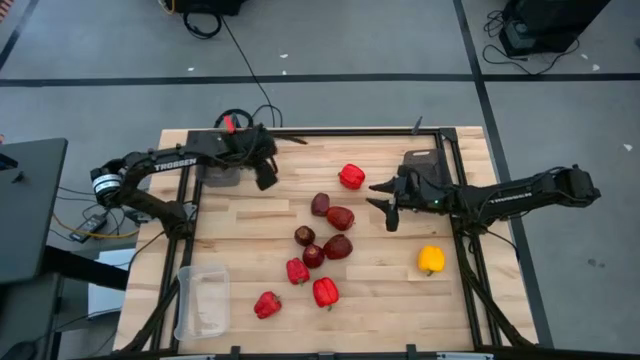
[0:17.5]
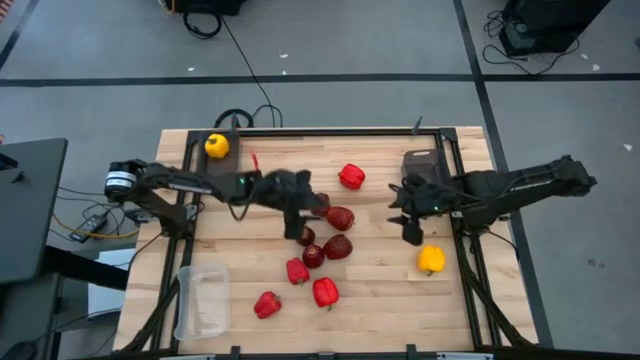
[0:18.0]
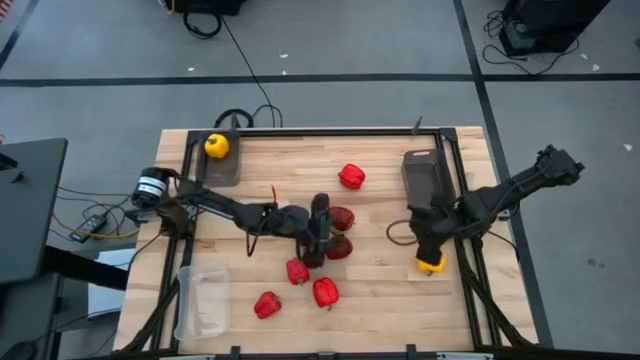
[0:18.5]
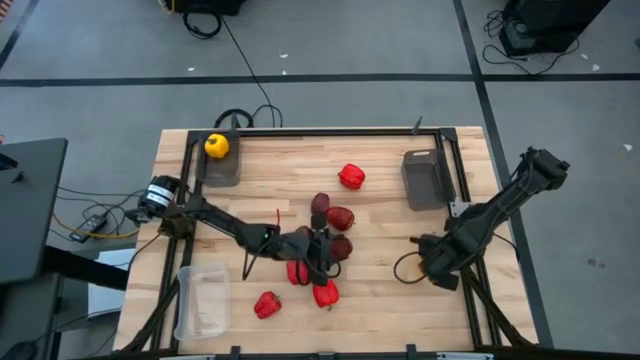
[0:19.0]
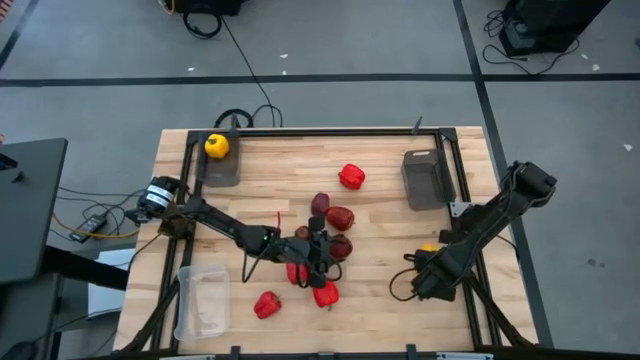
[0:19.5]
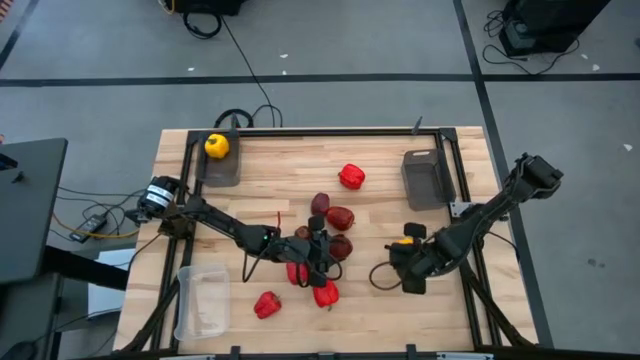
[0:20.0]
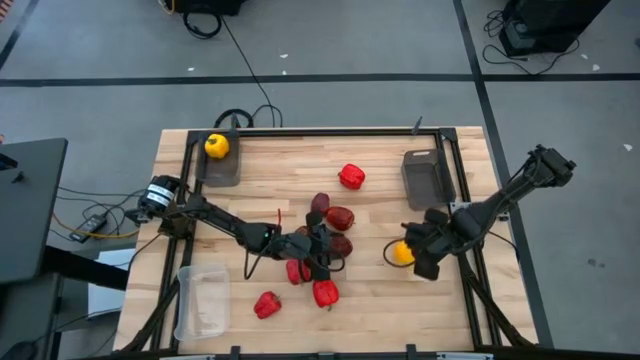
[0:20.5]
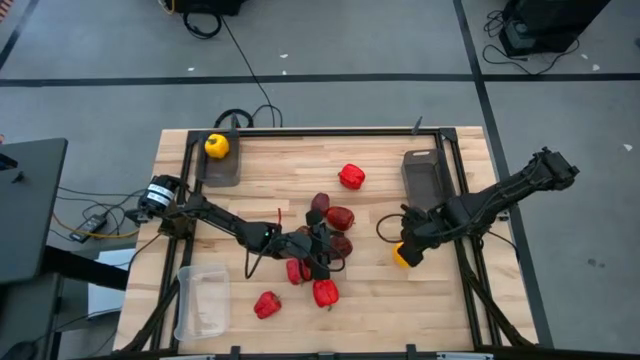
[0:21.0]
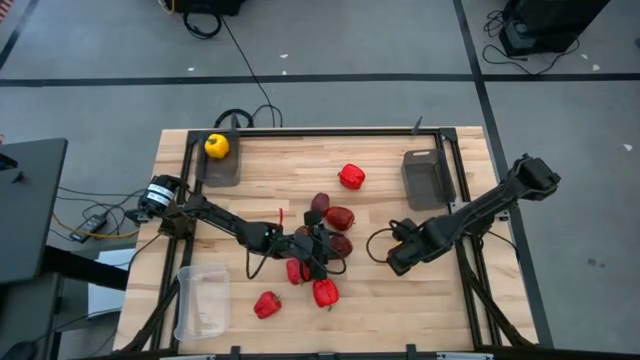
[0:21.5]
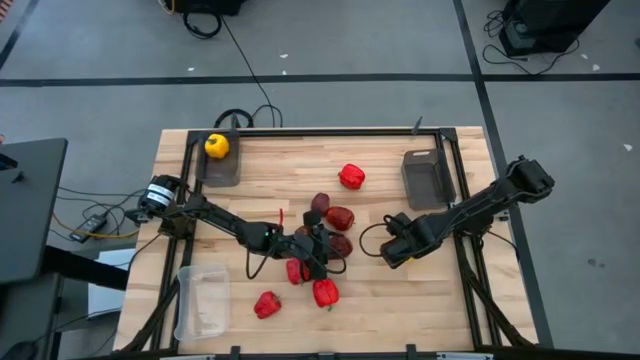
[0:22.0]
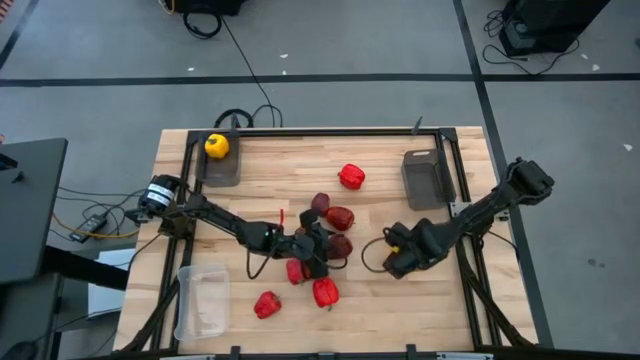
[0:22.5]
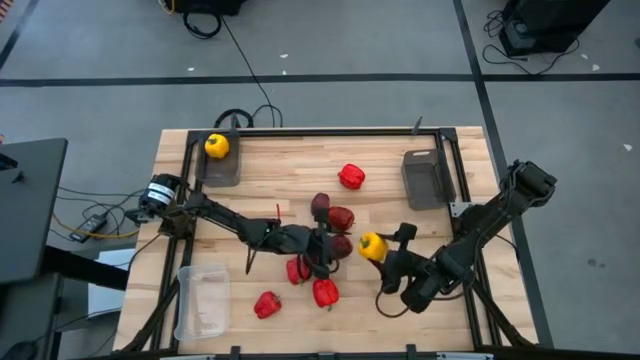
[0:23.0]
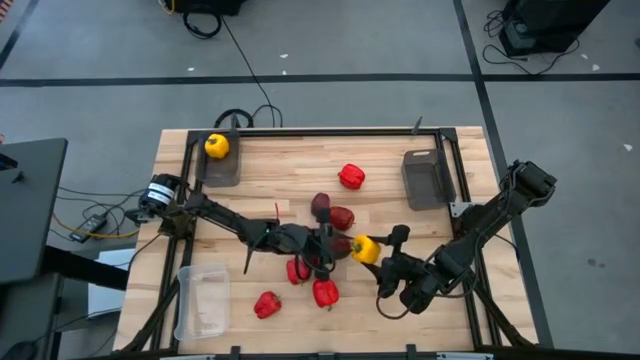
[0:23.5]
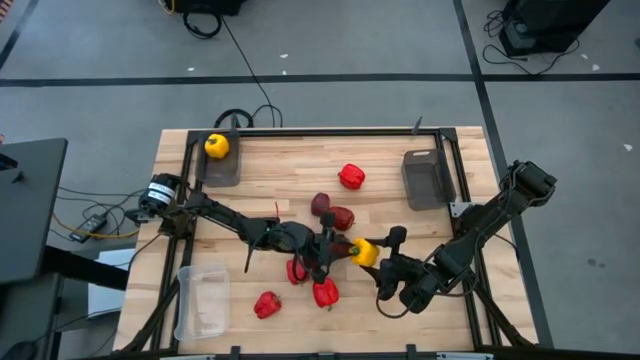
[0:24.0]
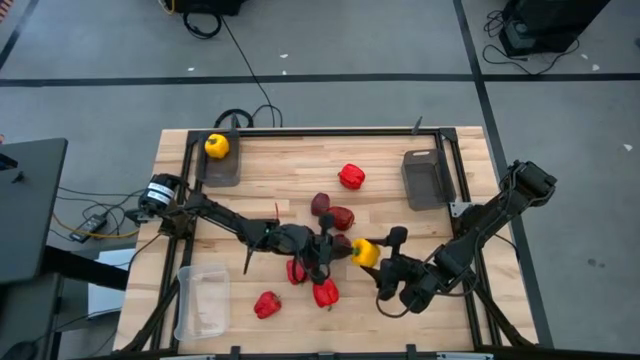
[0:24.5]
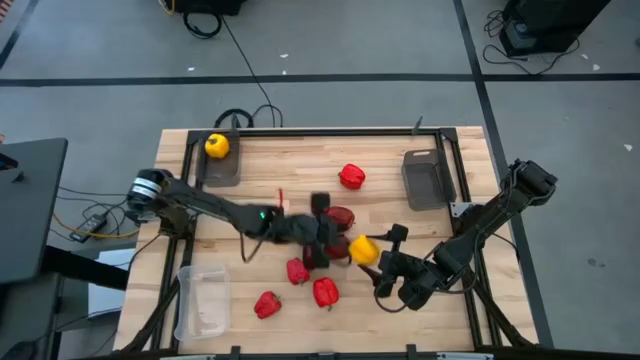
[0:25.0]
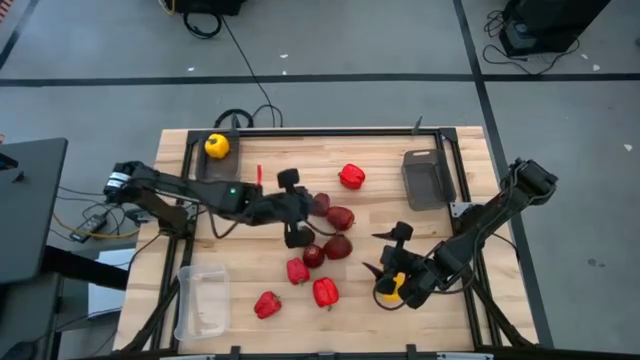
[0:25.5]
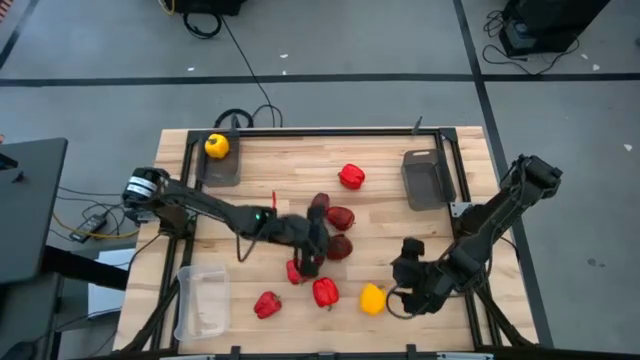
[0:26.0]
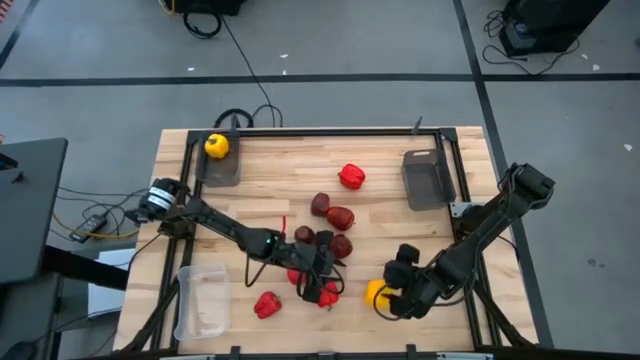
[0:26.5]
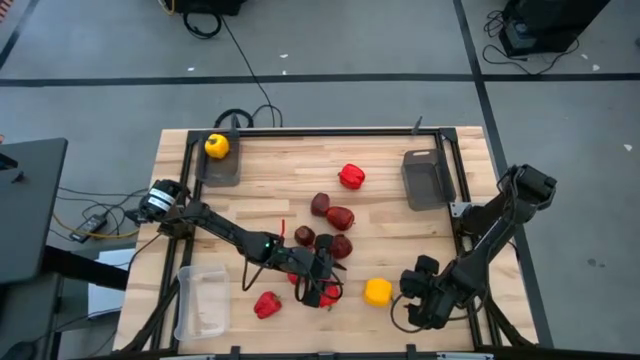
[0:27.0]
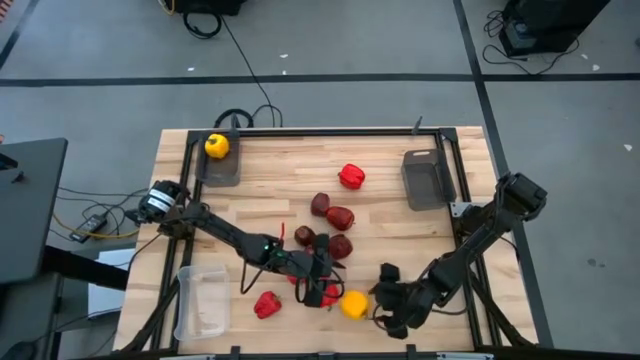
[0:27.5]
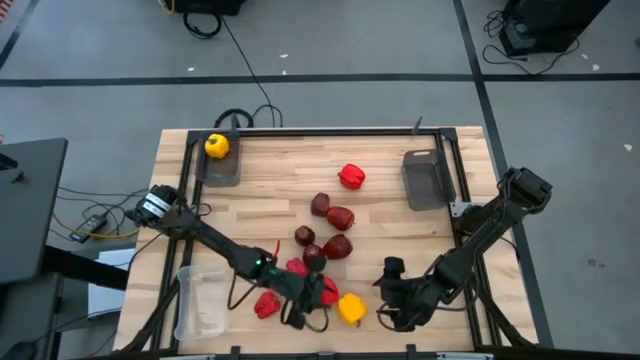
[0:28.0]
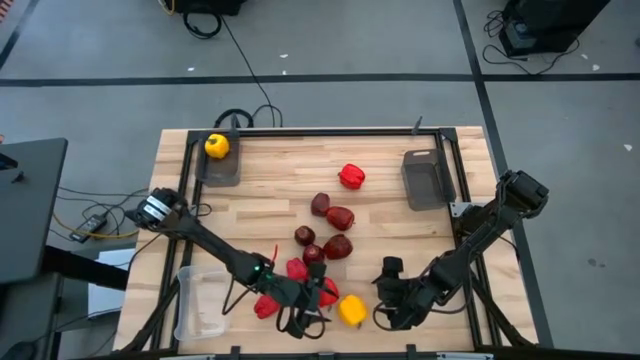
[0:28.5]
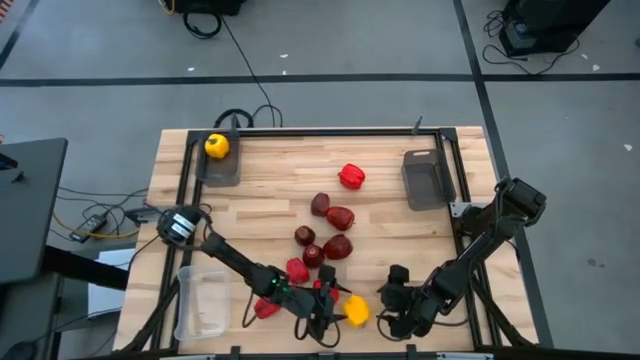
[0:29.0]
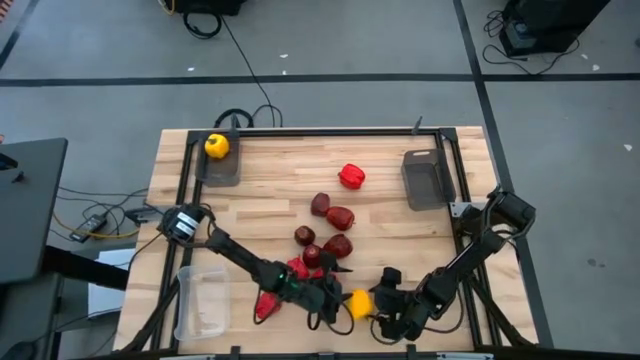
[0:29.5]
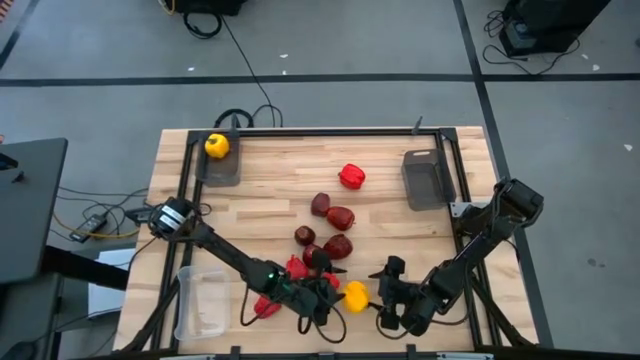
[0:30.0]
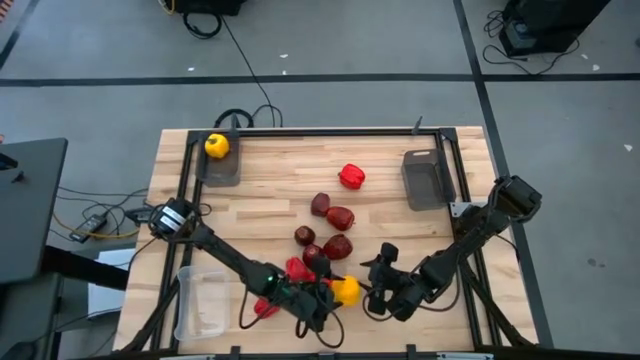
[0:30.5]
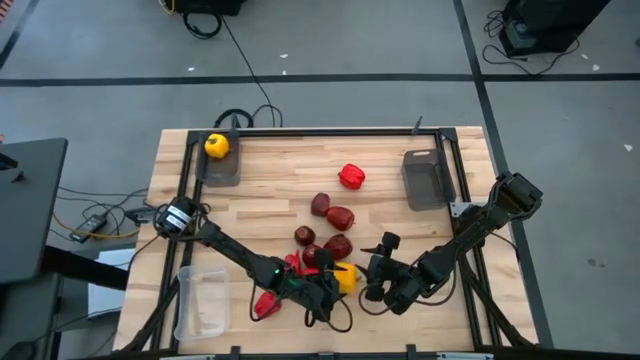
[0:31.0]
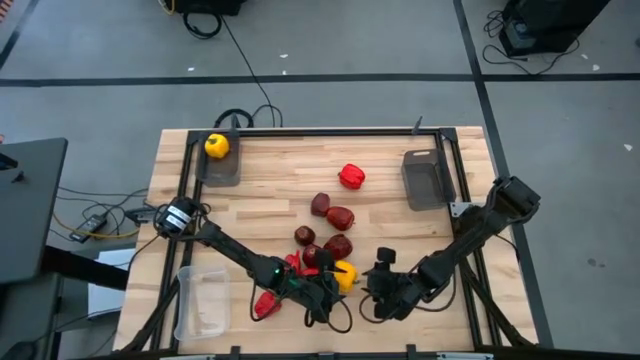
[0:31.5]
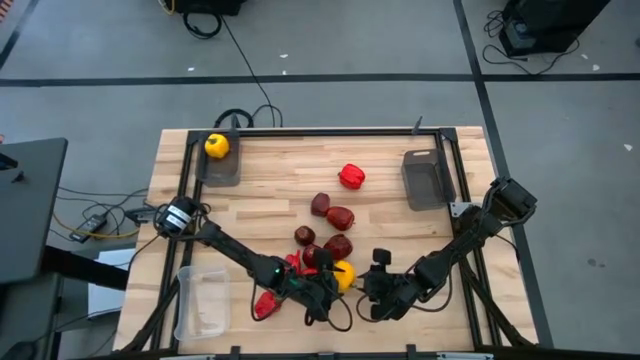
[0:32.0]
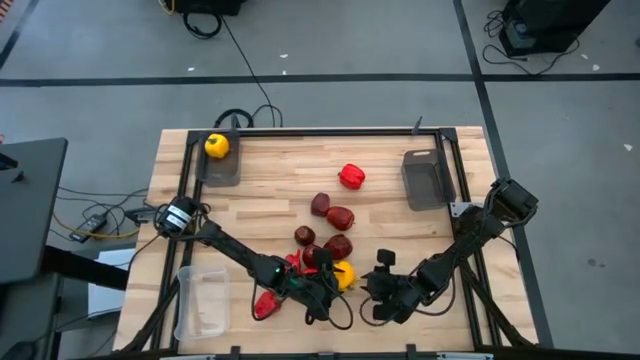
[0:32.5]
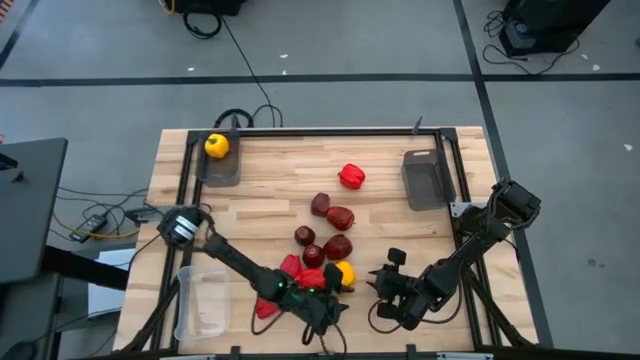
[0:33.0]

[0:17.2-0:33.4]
Task: Sort produce into baskets
Put the yellow bell pepper into the left black transparent bin

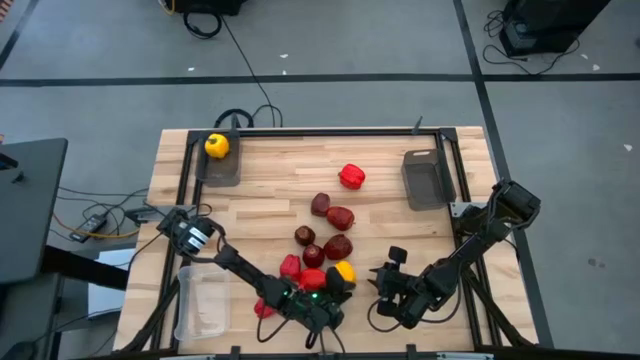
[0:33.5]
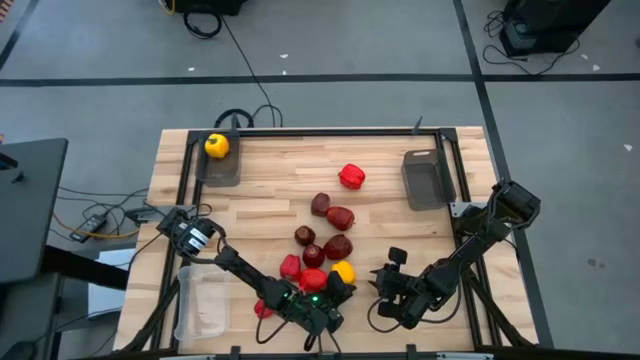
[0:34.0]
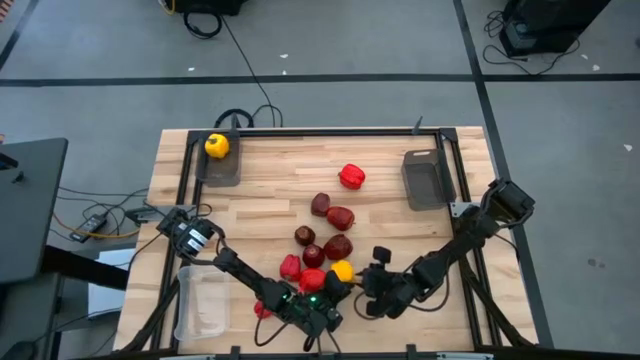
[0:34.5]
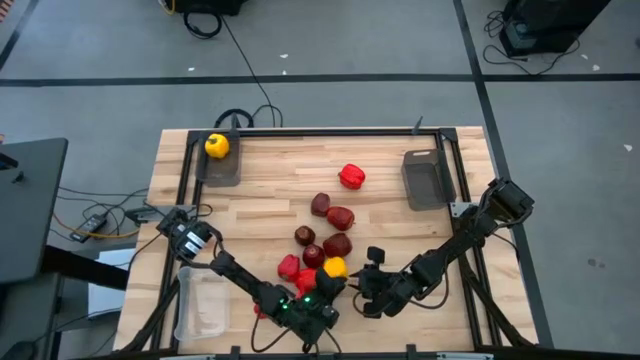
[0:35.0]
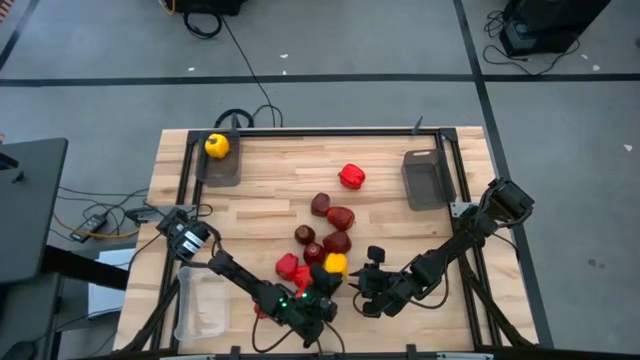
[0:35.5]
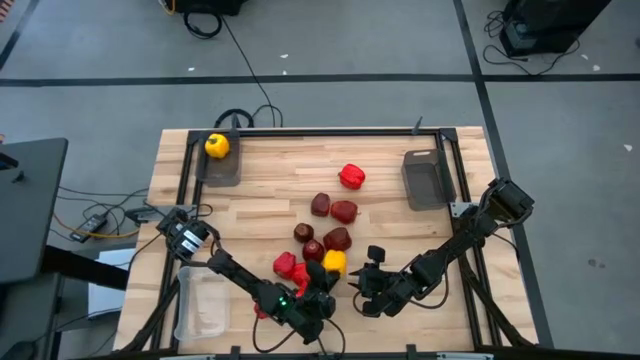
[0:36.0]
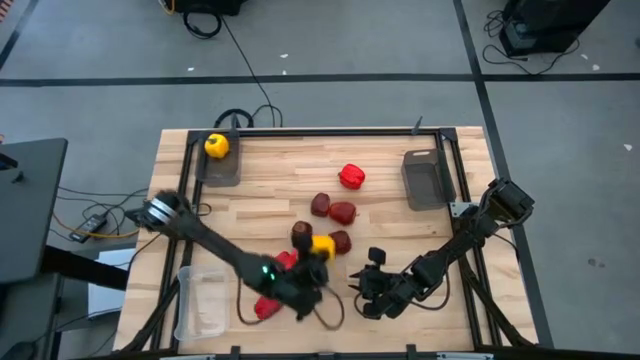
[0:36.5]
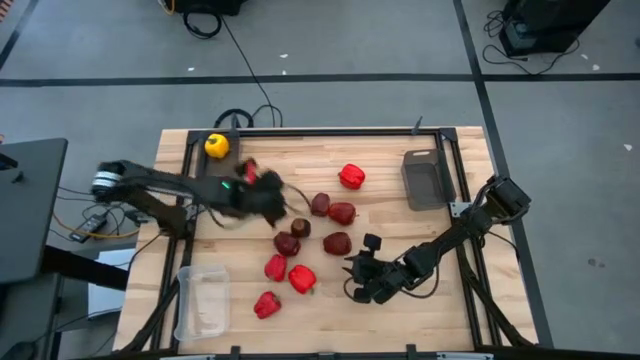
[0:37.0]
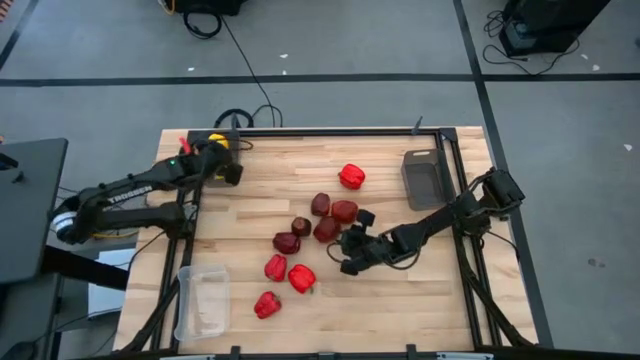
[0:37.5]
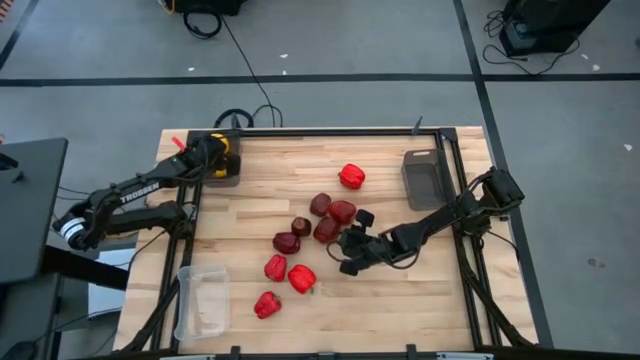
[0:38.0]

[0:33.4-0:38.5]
Put the yellow bell pepper into the left black transparent bin
